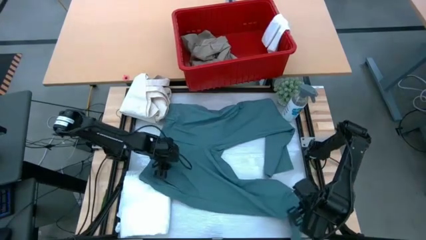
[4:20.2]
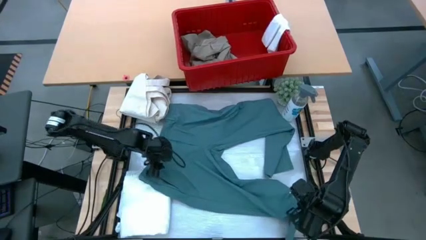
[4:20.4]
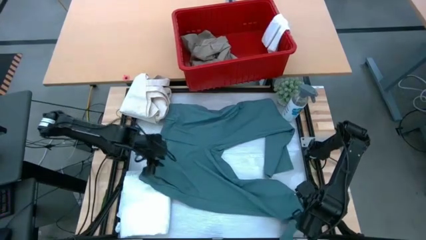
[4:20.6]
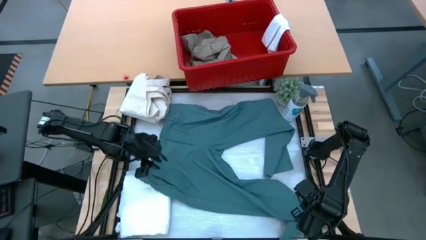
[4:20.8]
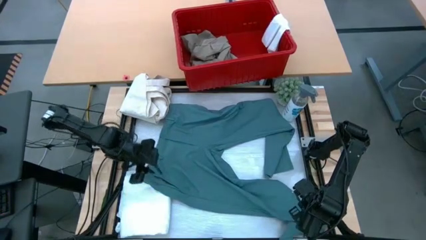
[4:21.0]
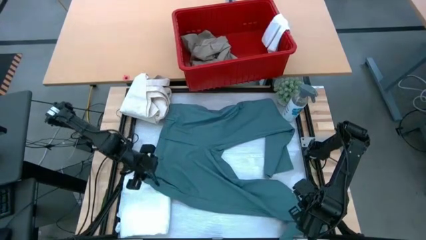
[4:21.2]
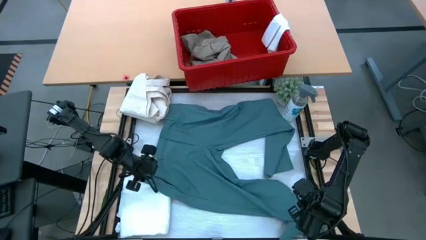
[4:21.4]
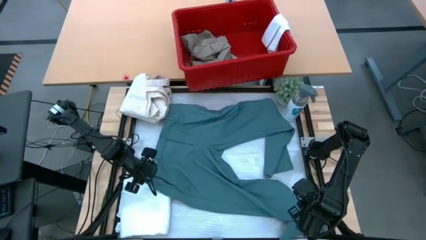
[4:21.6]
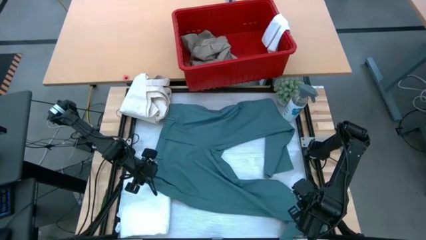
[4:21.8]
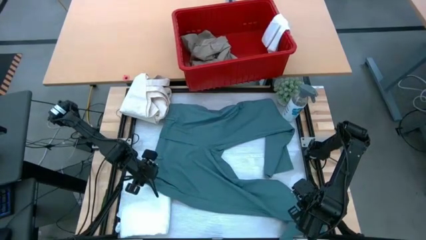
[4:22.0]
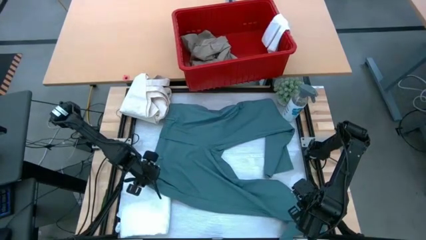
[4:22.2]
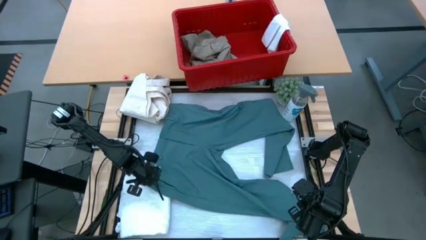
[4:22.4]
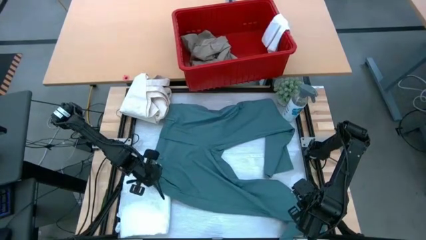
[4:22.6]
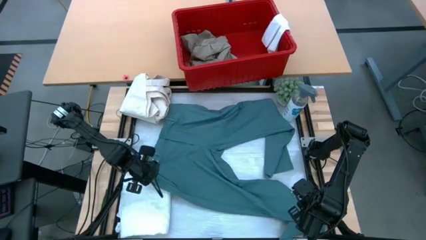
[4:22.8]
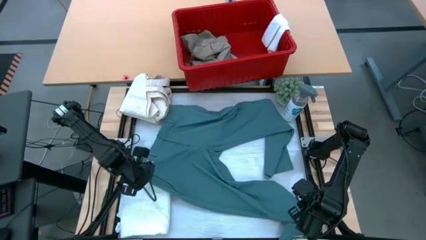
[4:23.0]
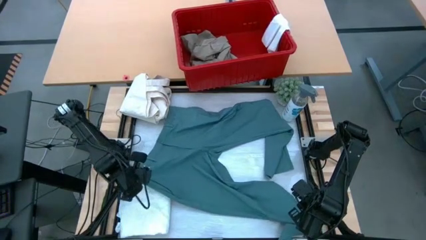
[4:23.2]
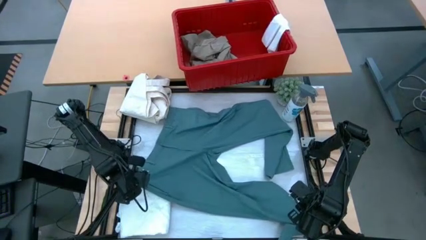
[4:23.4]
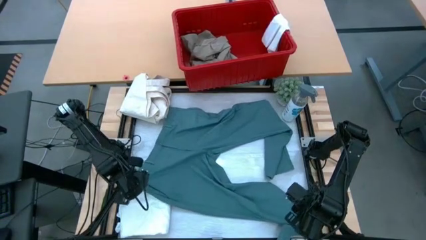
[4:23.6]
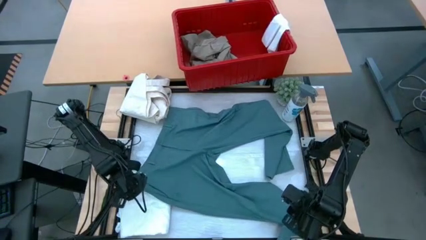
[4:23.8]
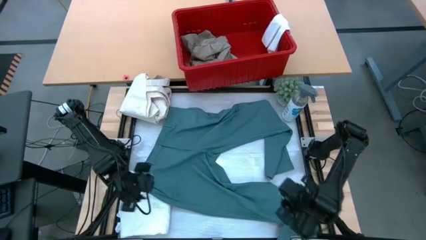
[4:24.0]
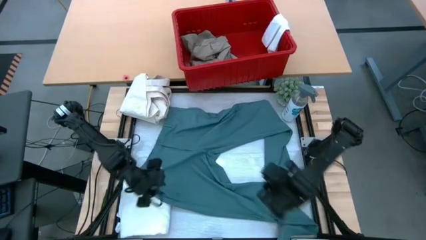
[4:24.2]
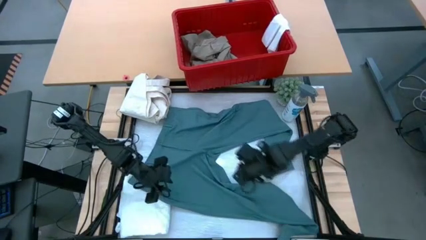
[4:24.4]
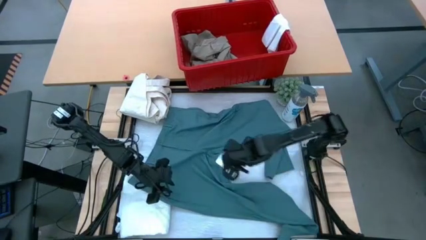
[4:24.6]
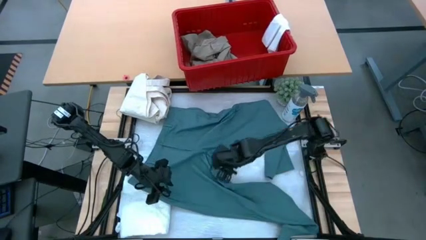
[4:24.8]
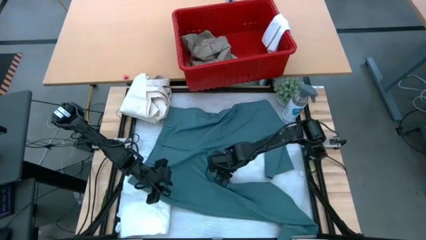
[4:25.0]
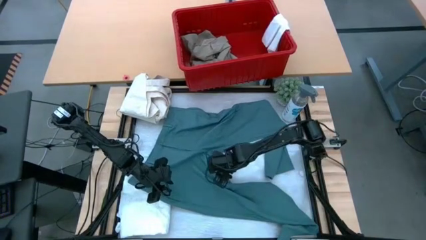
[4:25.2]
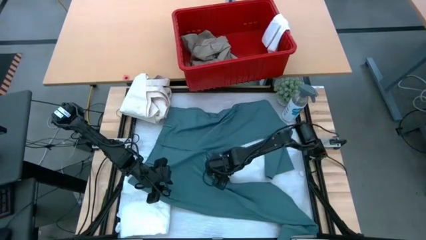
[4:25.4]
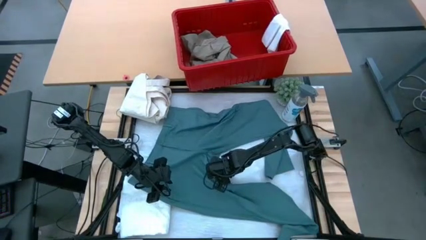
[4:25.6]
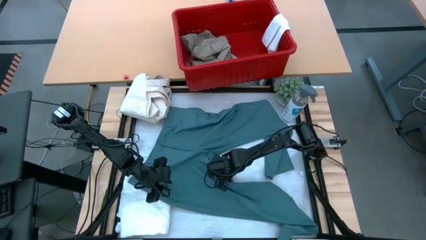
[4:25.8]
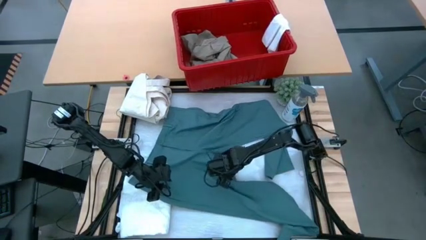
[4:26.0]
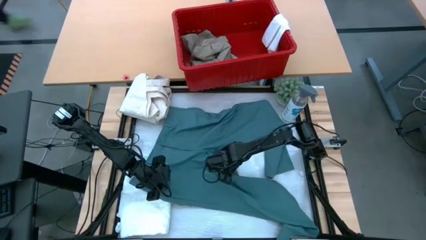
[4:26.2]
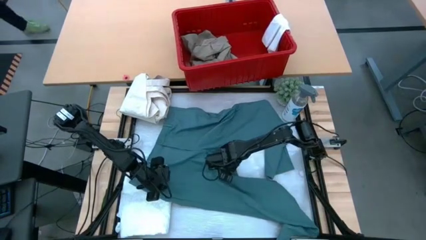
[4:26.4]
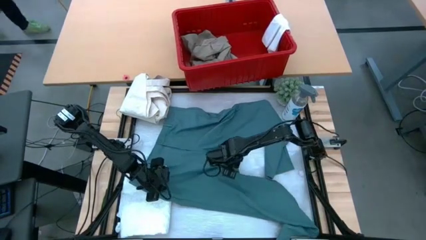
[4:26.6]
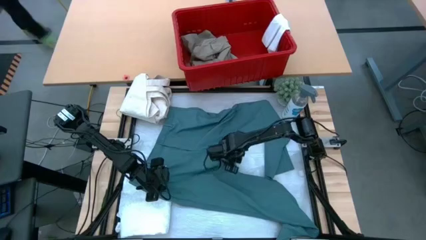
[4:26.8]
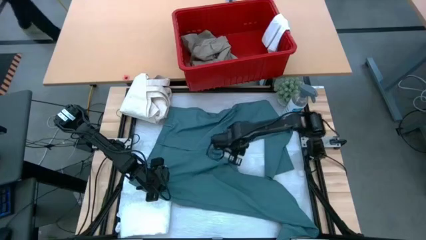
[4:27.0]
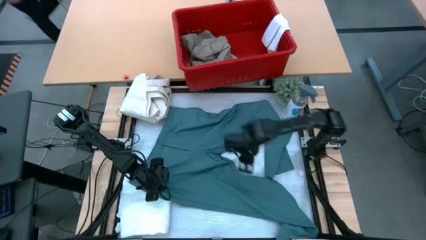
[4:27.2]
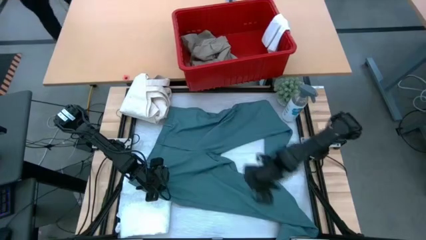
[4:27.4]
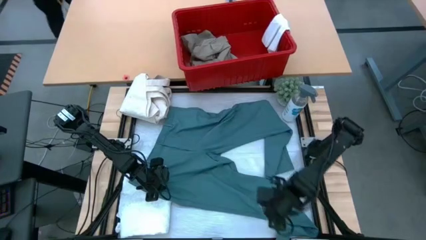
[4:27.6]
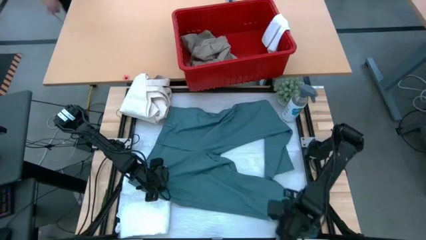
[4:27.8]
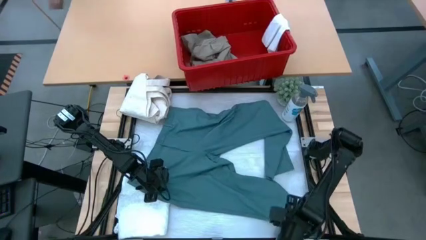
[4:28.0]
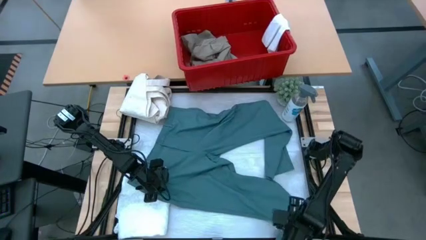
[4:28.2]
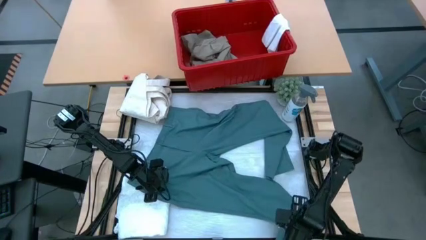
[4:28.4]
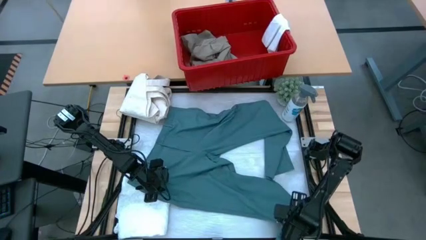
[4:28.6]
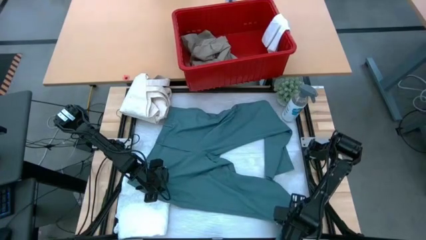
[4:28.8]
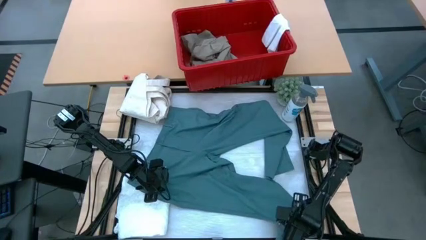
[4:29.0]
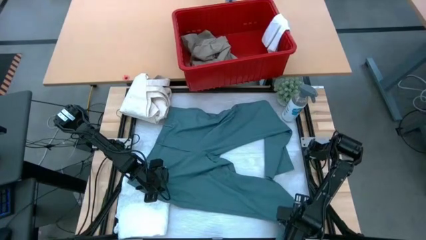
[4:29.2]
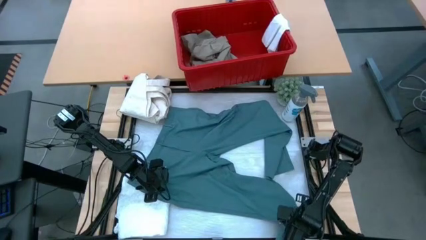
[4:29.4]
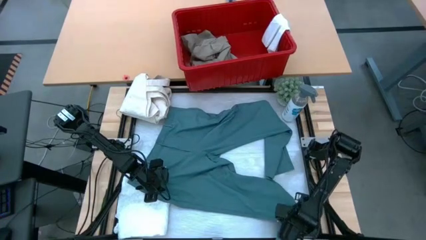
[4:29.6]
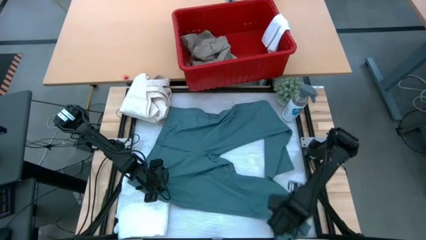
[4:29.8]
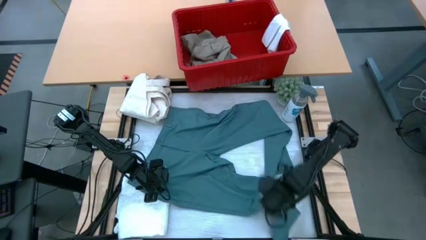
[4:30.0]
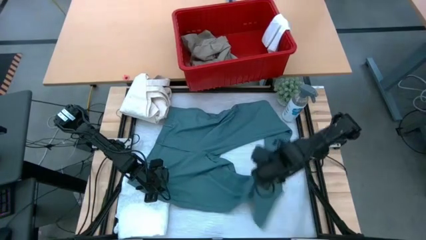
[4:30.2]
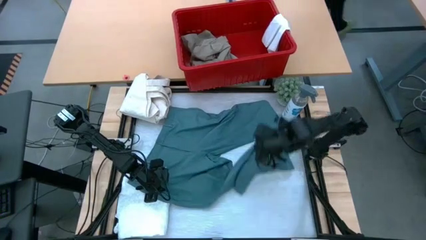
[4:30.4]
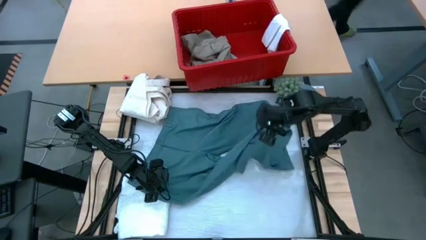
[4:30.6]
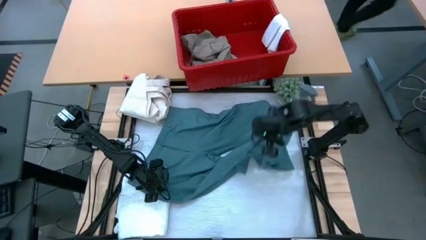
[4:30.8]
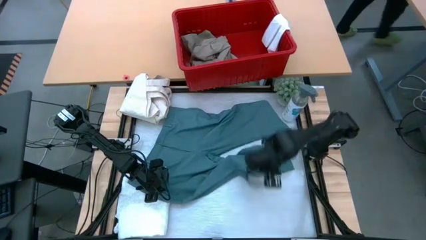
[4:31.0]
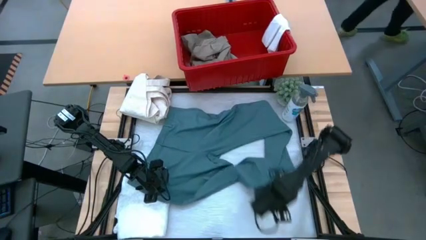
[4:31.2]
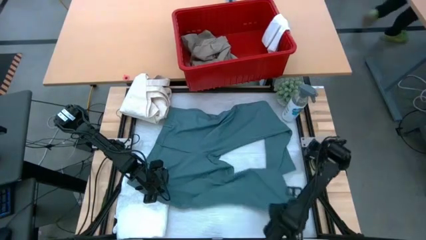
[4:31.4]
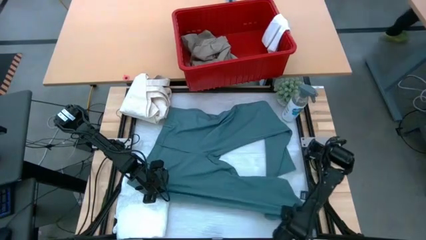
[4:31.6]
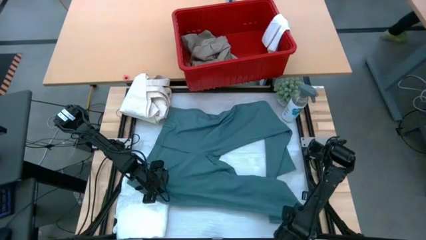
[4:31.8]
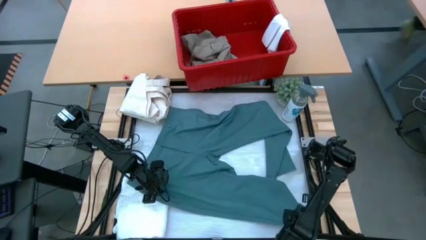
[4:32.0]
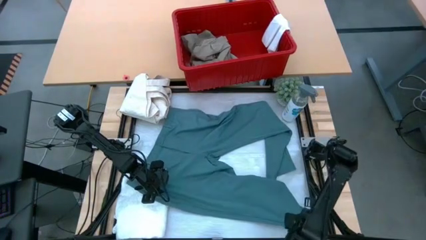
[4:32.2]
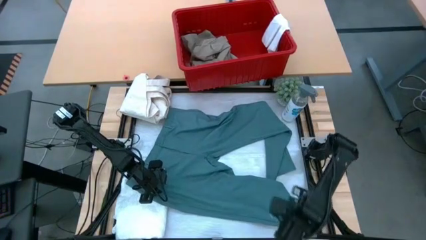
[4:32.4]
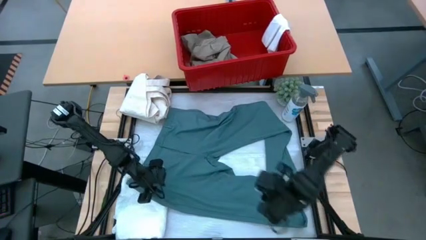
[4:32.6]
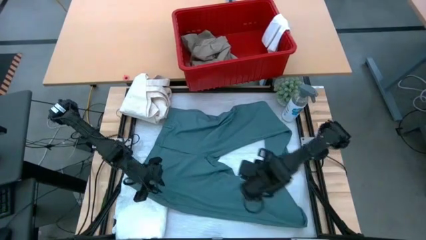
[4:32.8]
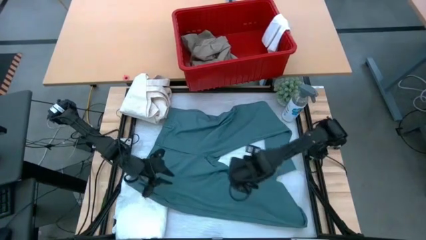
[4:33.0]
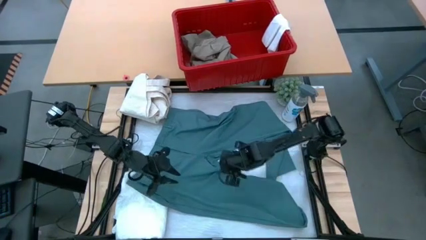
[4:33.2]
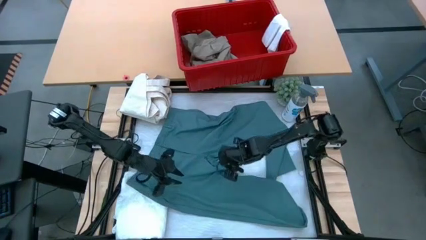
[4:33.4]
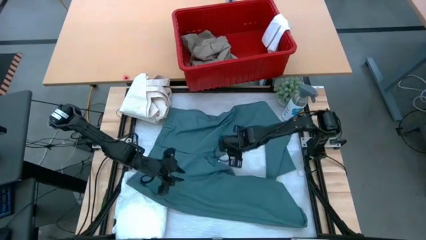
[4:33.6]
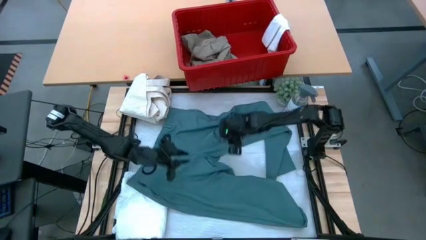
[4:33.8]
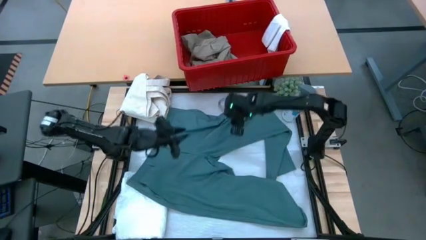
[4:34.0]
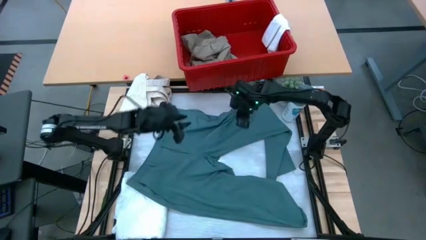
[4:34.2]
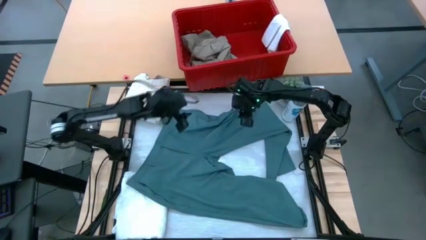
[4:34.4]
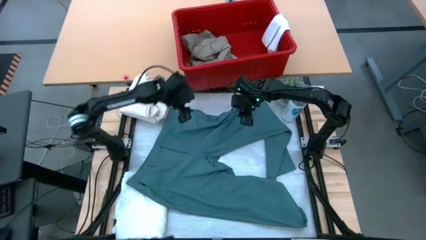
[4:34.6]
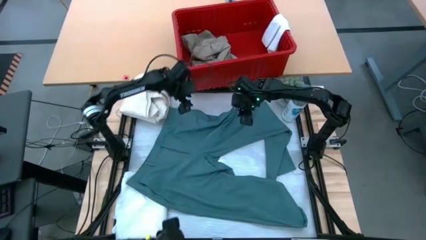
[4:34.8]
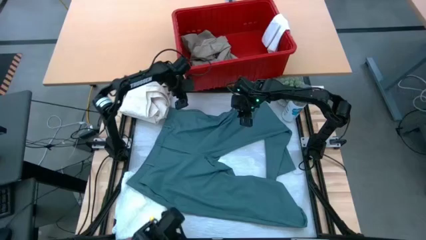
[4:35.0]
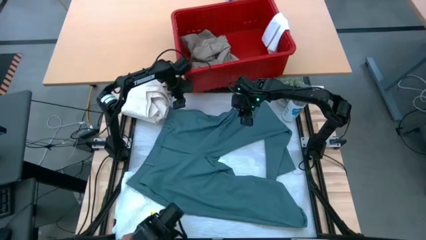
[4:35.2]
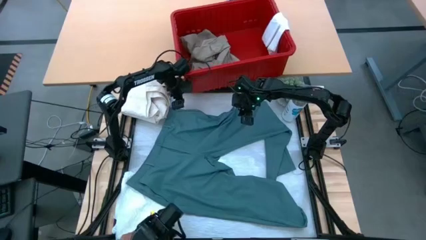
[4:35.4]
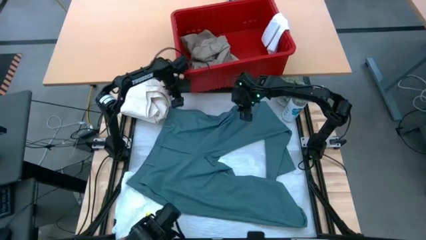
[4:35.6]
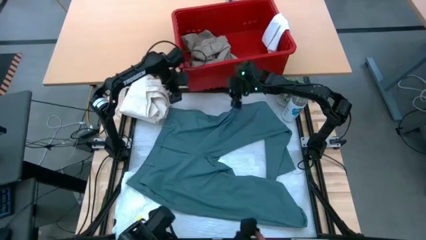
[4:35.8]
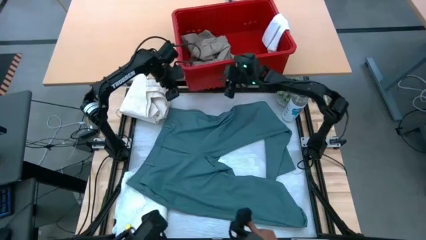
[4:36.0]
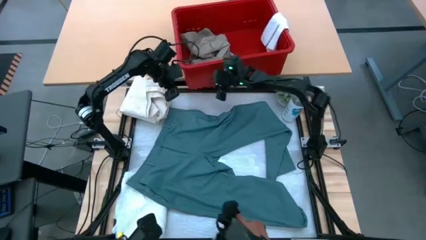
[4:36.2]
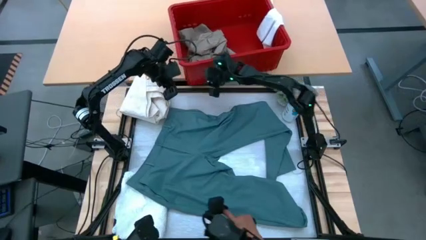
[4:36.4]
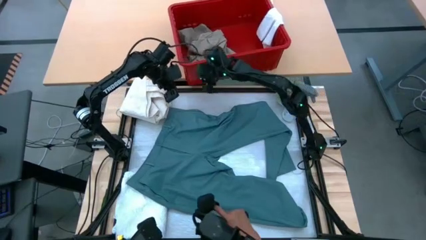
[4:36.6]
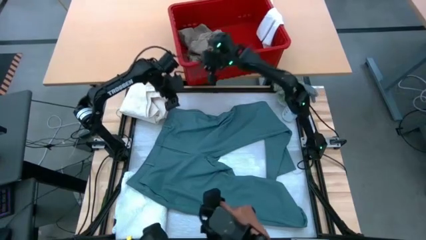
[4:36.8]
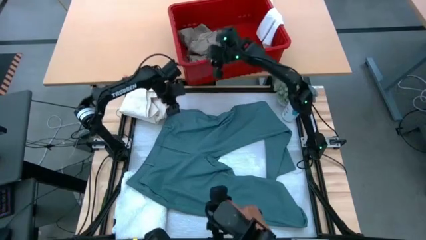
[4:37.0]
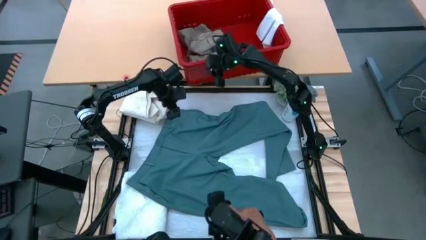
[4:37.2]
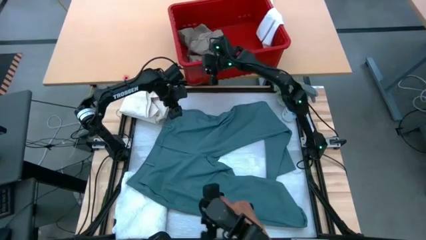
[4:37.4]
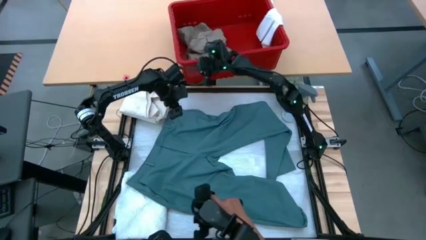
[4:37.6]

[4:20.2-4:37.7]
Task: Fold Laundry from Bin
Fold the blue pants
